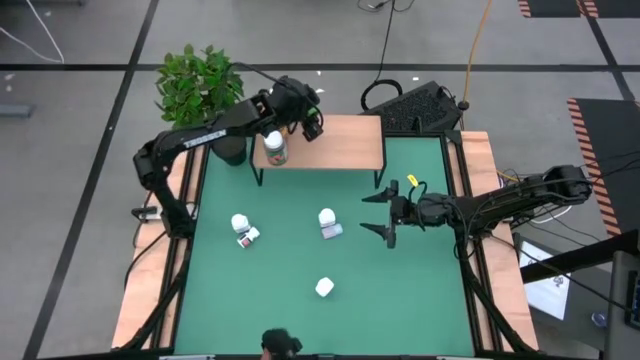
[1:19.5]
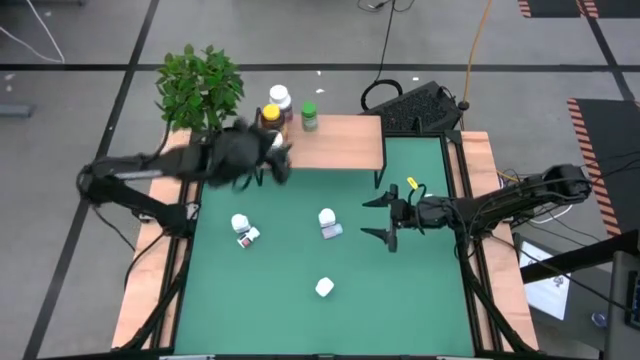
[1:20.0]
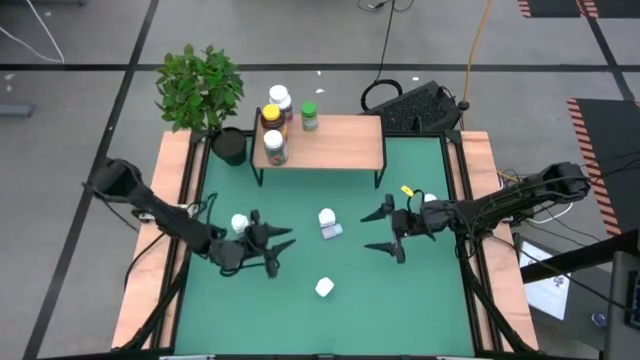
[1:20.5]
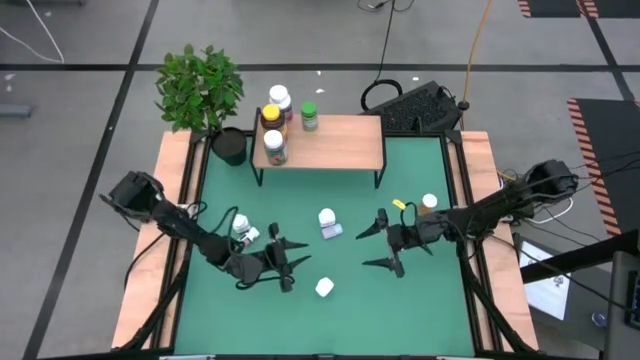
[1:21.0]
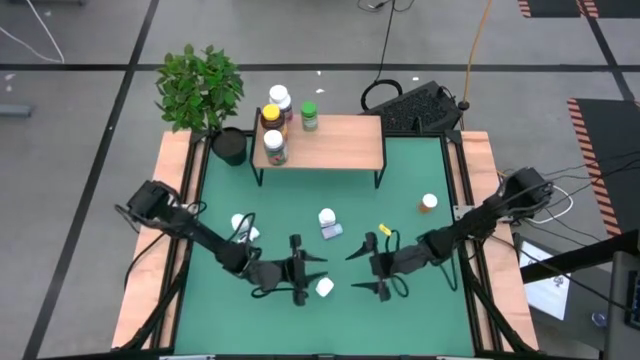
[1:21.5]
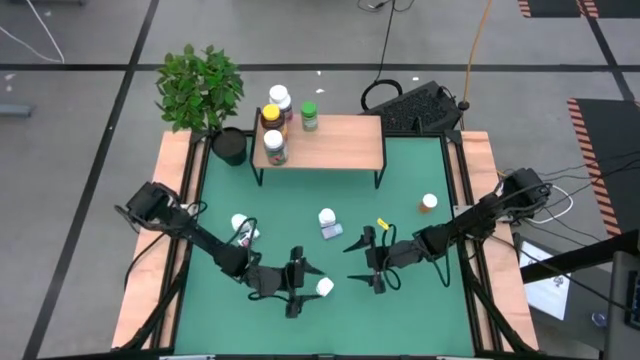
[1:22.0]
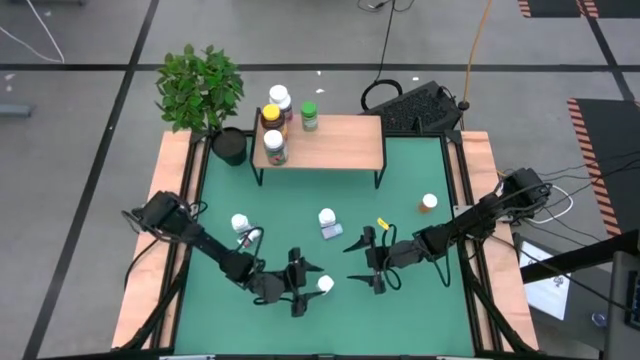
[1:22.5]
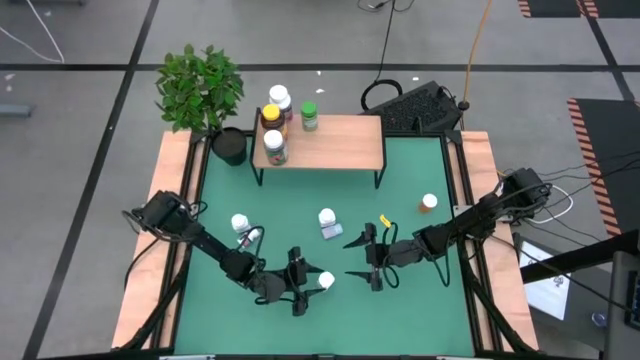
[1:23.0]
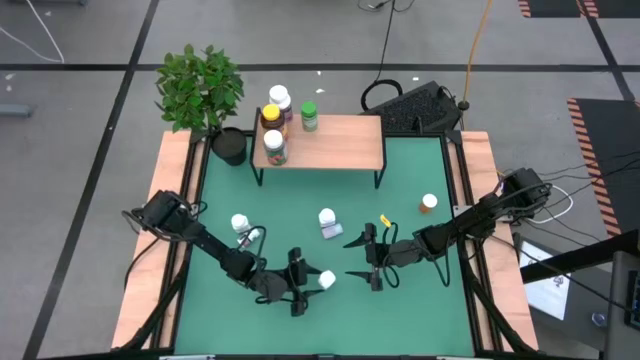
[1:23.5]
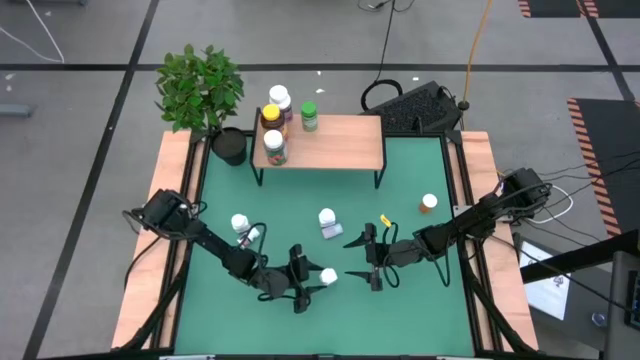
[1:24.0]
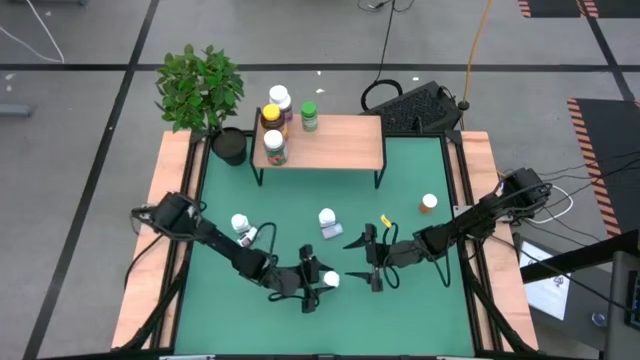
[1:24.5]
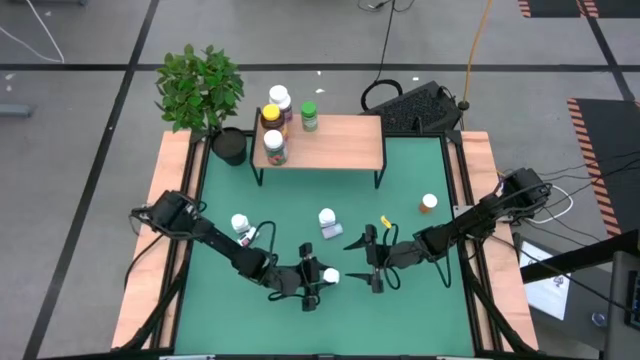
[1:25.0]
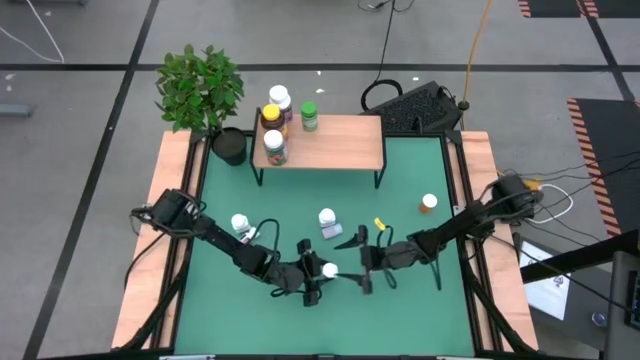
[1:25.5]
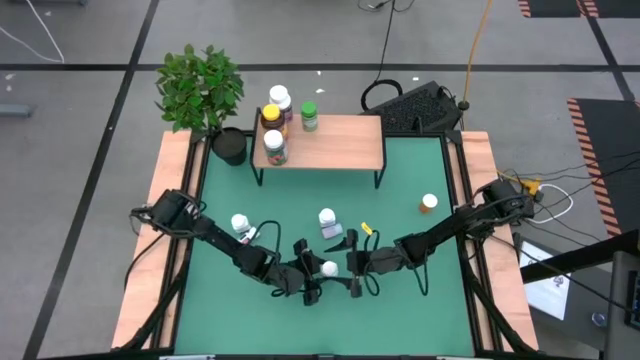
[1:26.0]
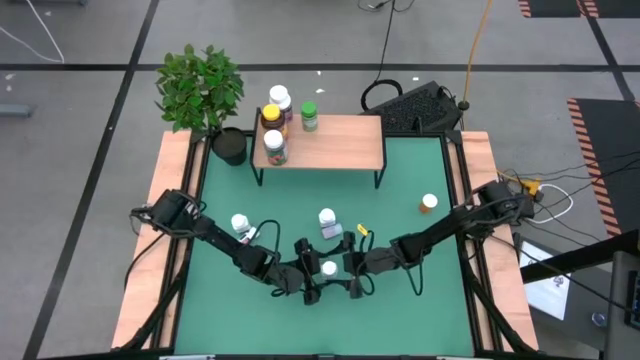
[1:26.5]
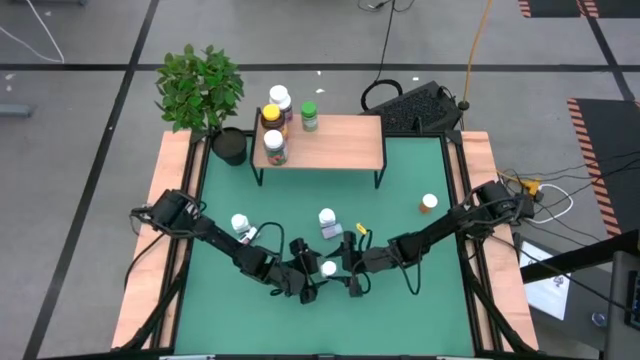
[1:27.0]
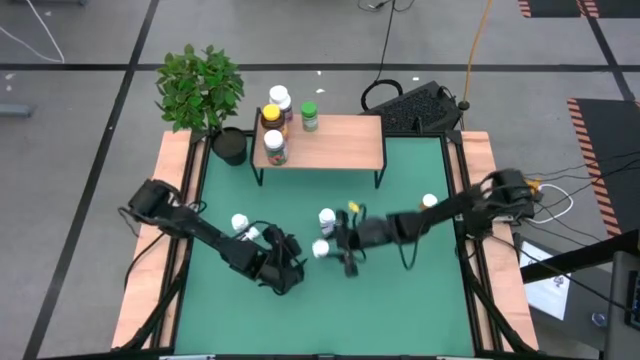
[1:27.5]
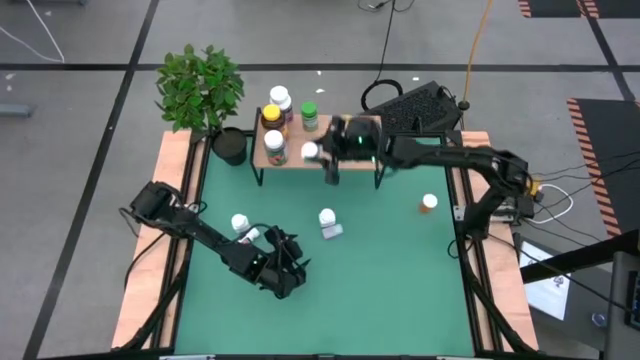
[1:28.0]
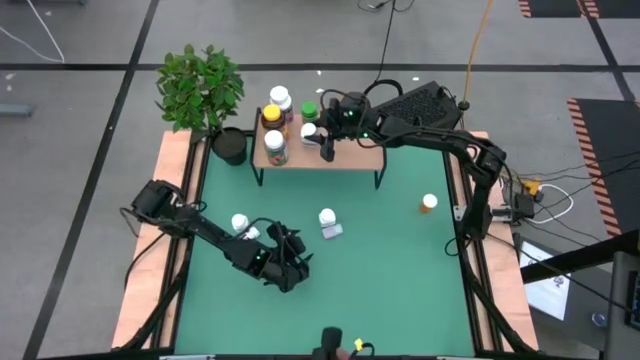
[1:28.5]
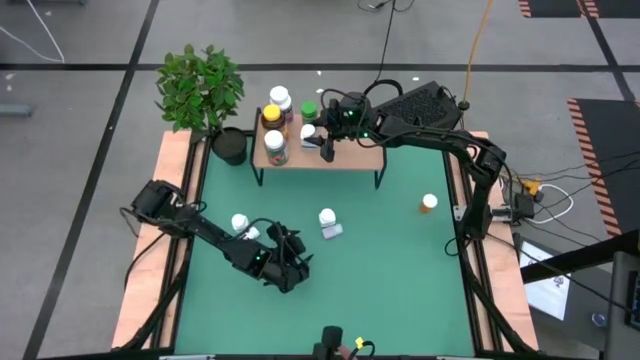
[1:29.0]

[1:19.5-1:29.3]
Task: Pick and place medicine bottles onto shelf by color
Put the bottom small white pill bottle pill on the shelf

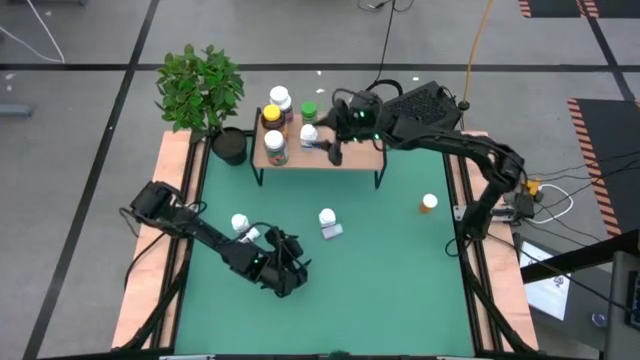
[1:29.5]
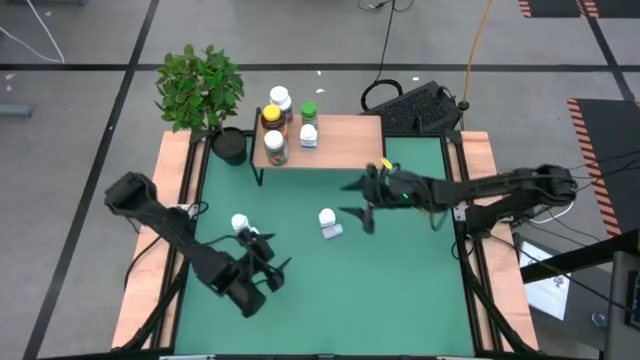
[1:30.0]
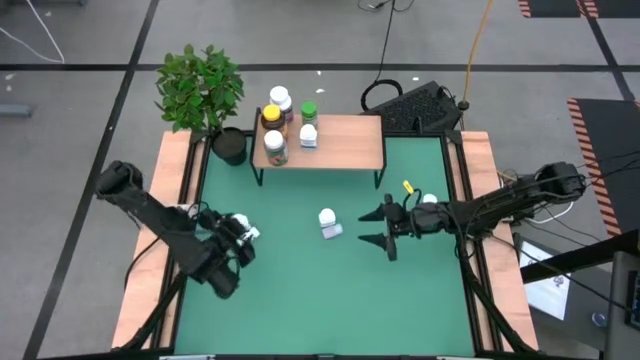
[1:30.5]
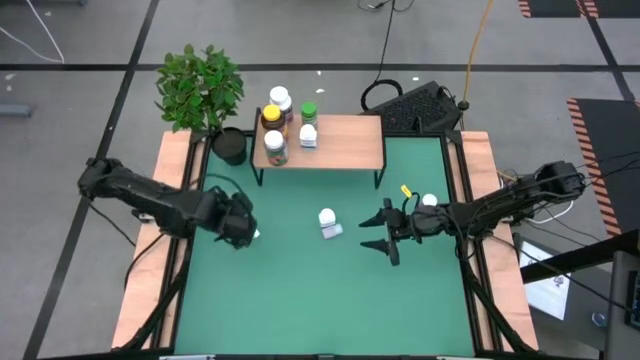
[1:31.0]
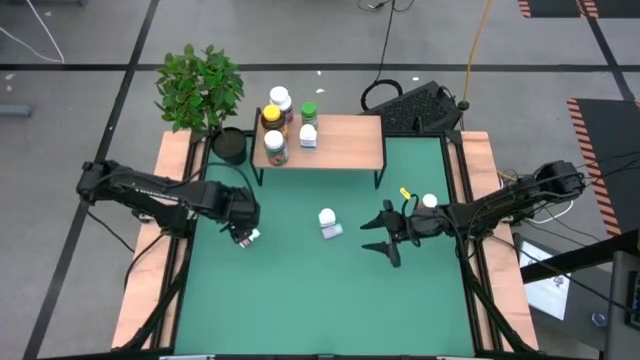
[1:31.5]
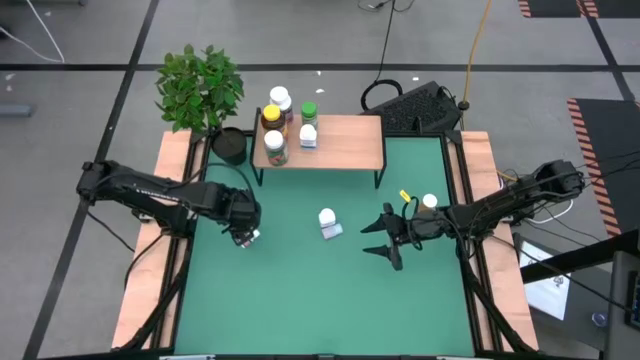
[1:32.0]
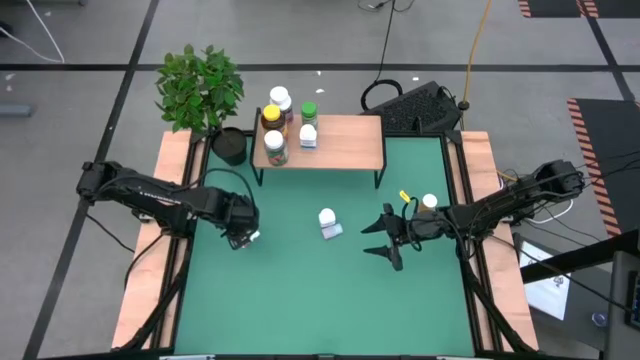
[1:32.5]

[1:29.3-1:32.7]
Put the left small white pill bottle on the shelf

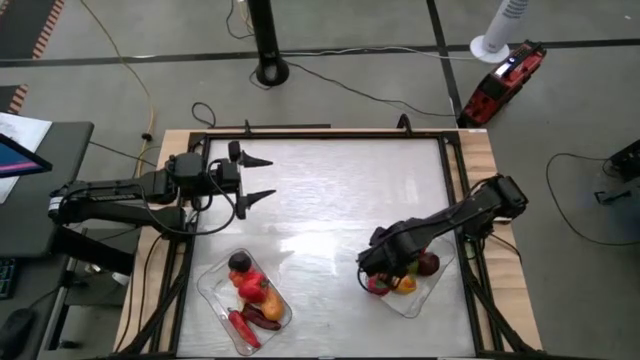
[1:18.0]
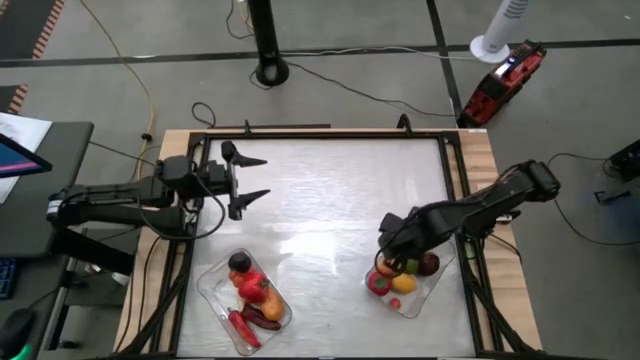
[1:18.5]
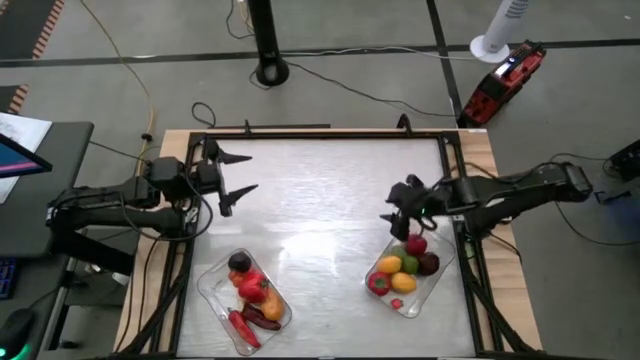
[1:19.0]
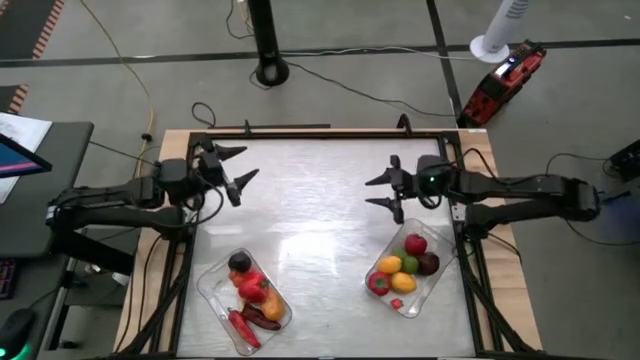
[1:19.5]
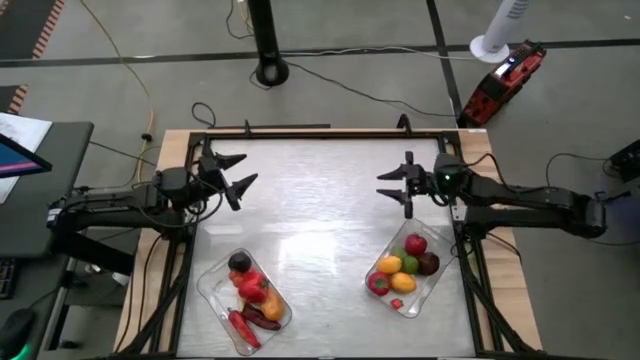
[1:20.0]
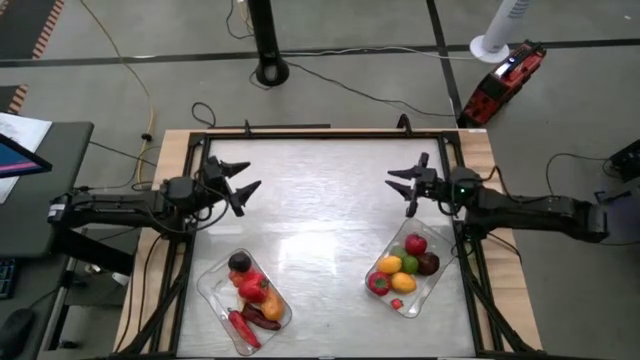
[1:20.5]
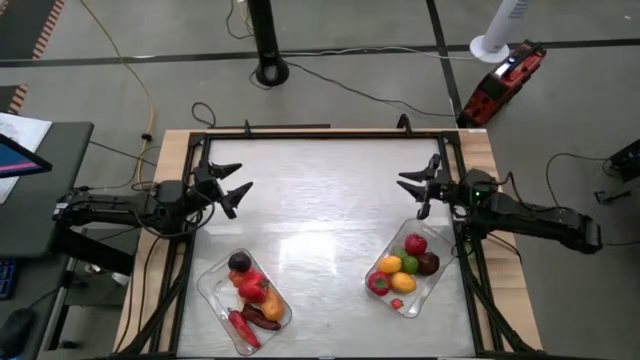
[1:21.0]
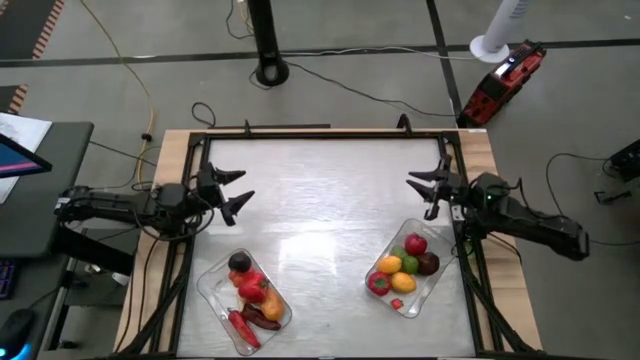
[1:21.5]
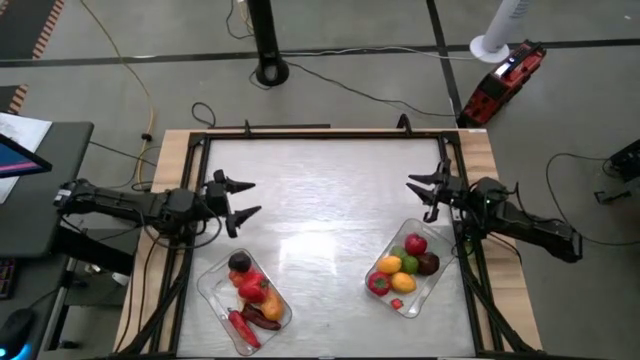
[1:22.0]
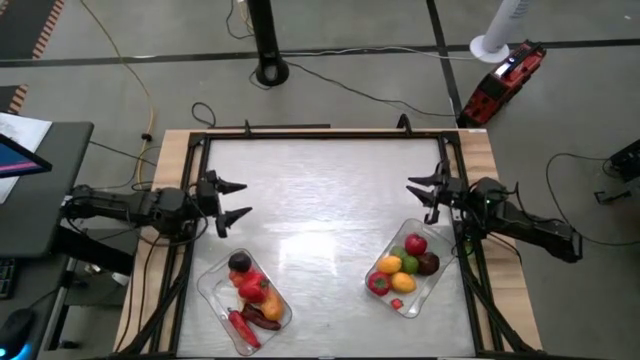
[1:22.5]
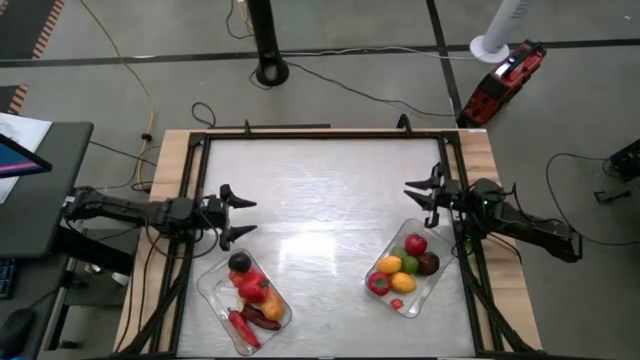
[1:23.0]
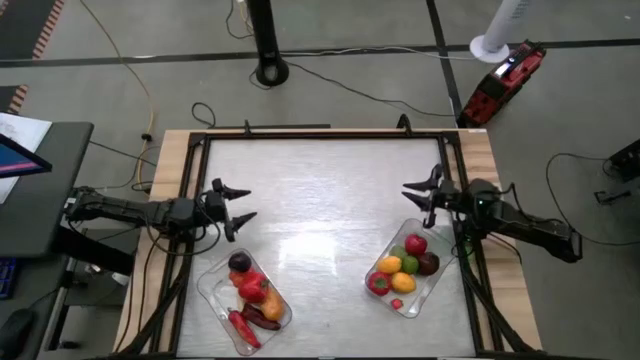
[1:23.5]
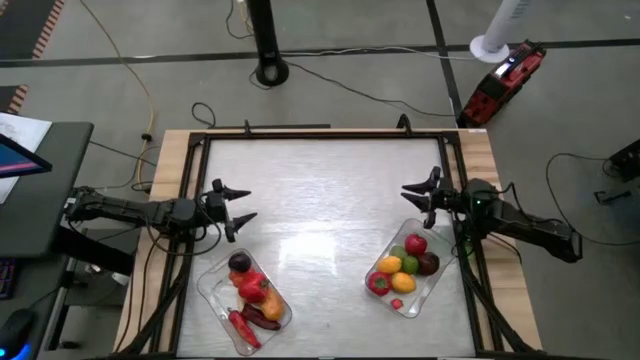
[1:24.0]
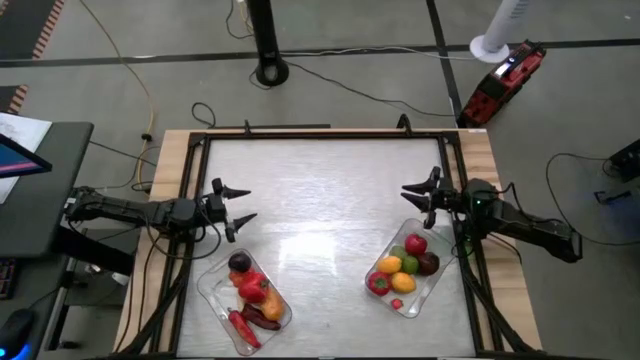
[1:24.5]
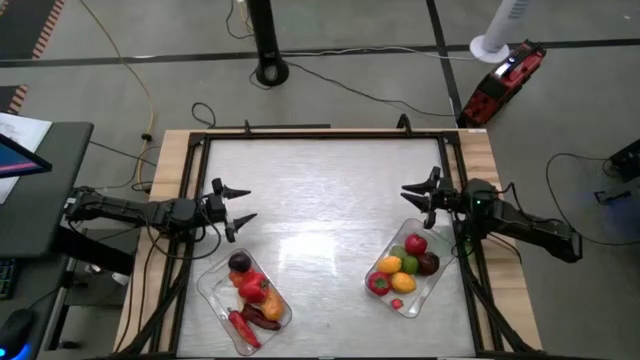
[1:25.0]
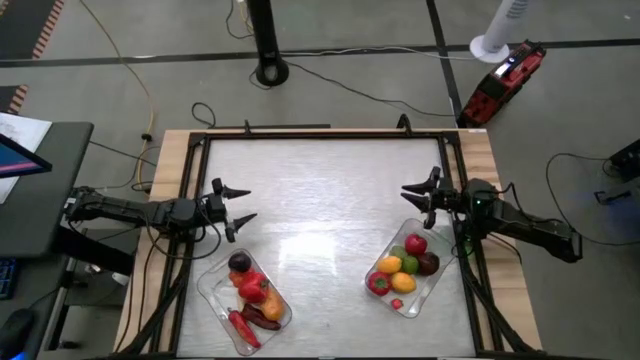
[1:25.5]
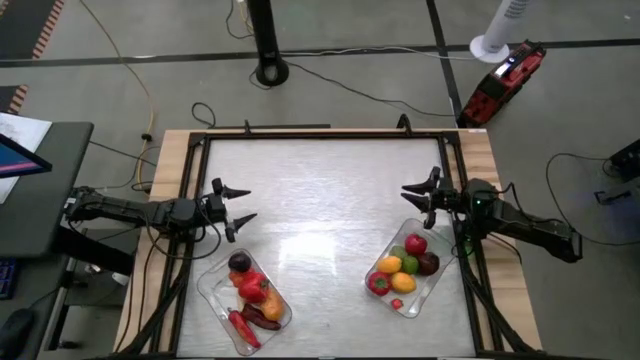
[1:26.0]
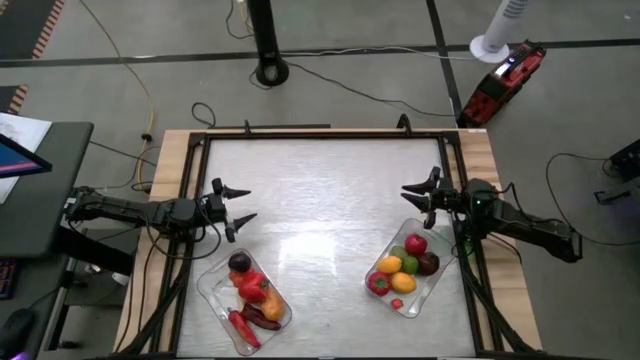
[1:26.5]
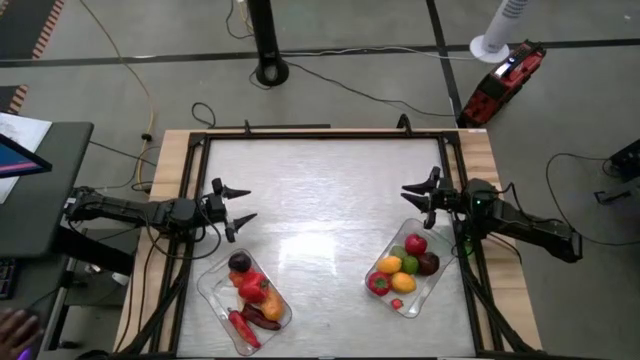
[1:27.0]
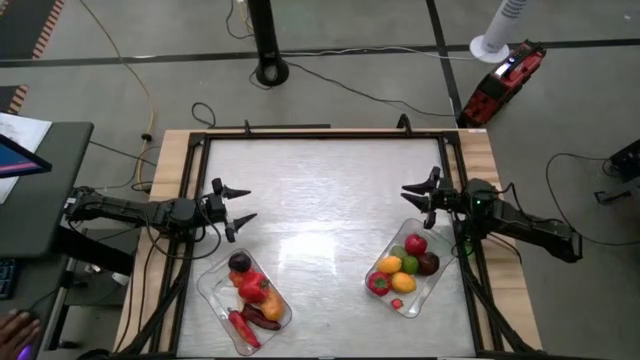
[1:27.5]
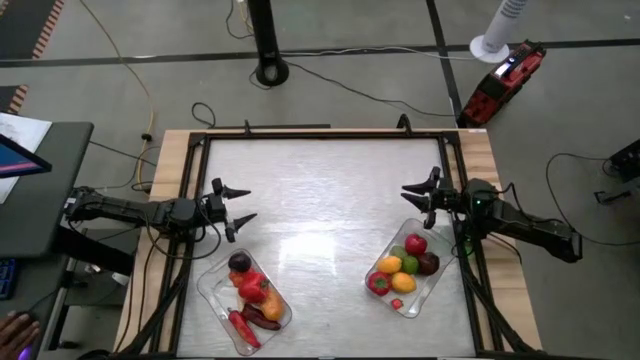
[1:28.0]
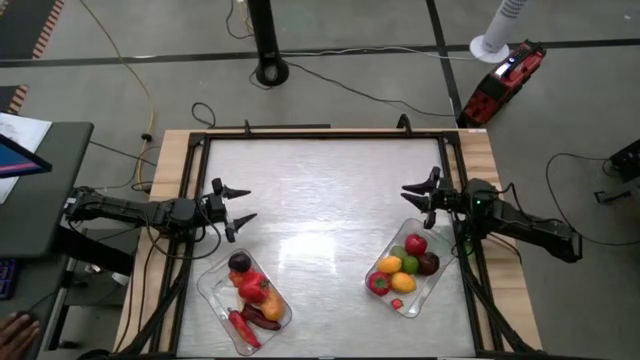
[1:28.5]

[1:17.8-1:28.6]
Task: Sort produce into baskets
Return to Home Position
